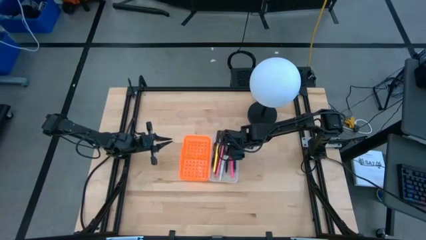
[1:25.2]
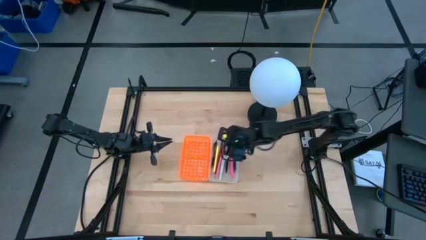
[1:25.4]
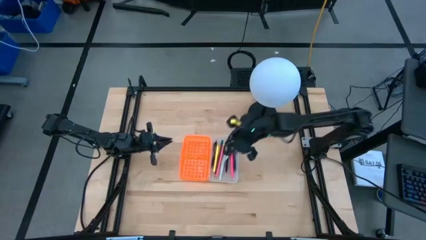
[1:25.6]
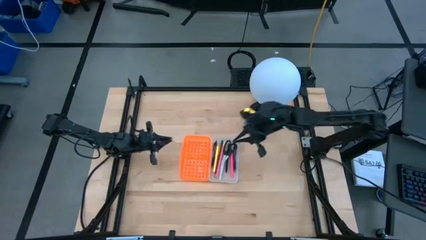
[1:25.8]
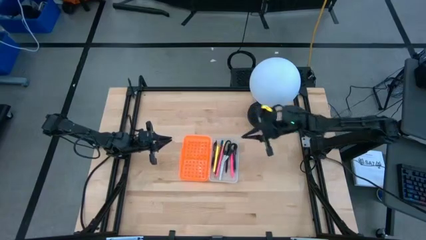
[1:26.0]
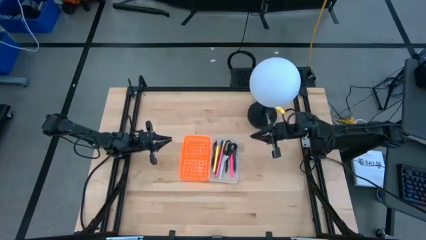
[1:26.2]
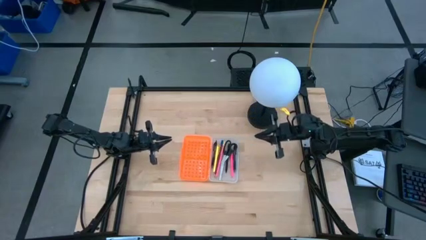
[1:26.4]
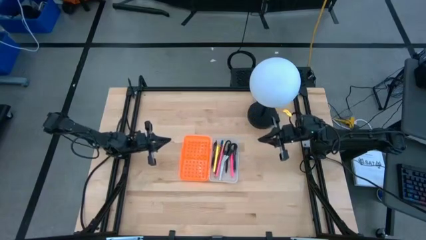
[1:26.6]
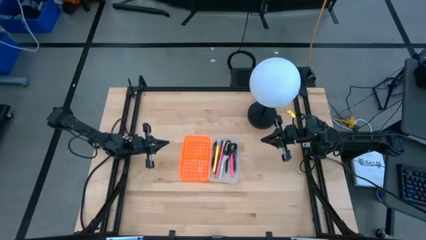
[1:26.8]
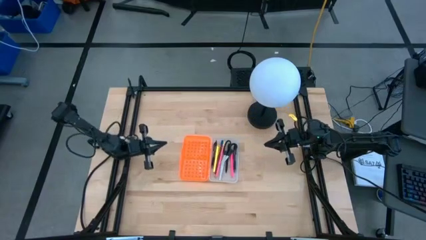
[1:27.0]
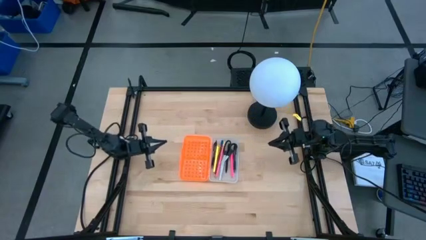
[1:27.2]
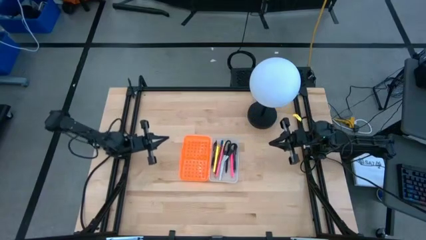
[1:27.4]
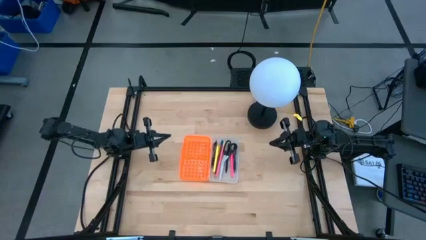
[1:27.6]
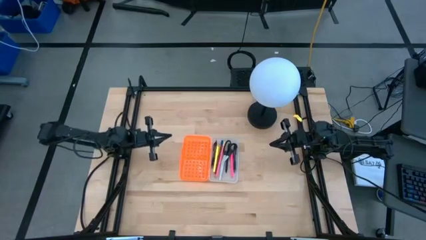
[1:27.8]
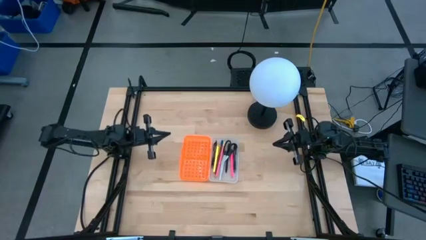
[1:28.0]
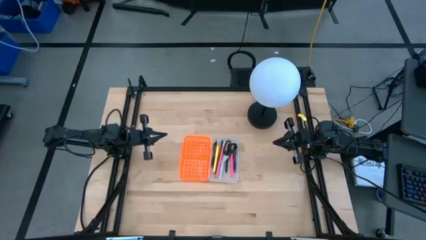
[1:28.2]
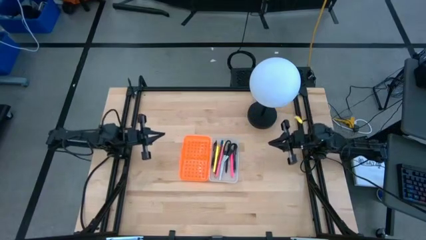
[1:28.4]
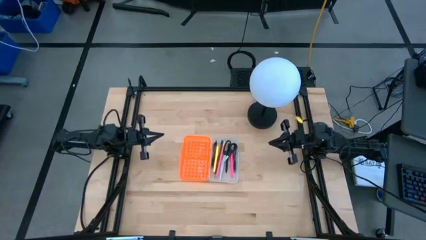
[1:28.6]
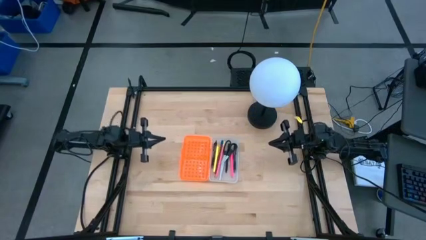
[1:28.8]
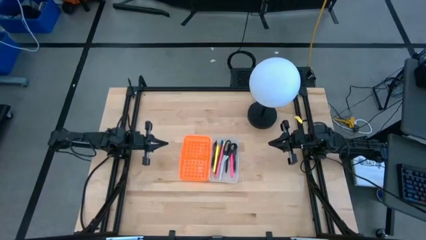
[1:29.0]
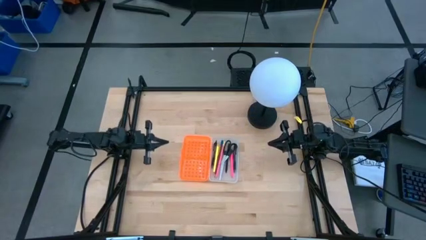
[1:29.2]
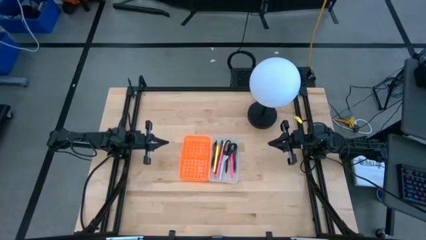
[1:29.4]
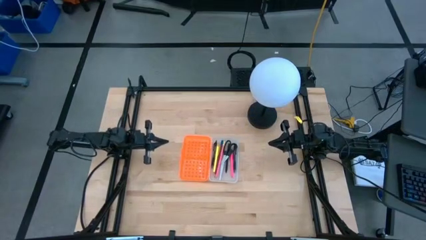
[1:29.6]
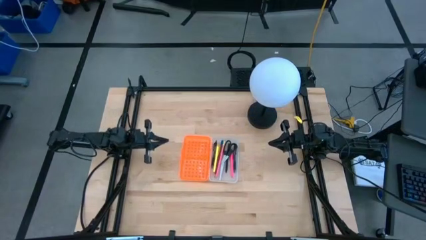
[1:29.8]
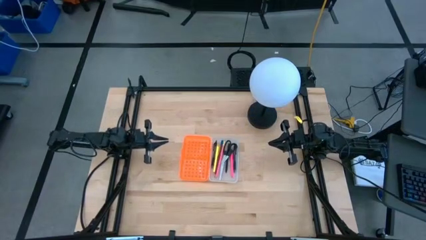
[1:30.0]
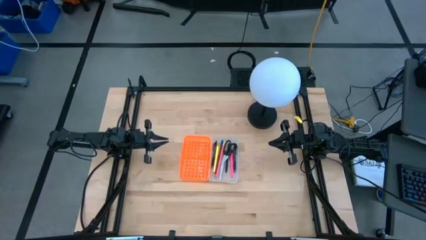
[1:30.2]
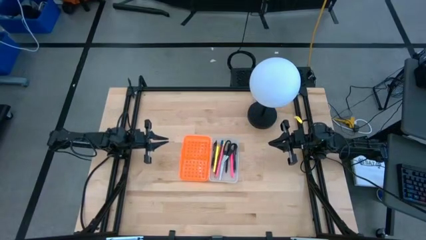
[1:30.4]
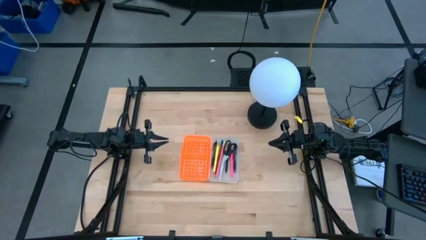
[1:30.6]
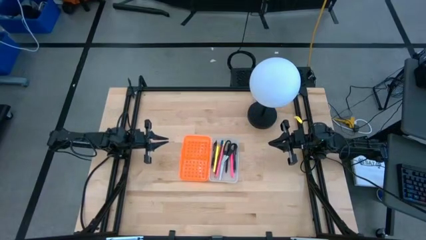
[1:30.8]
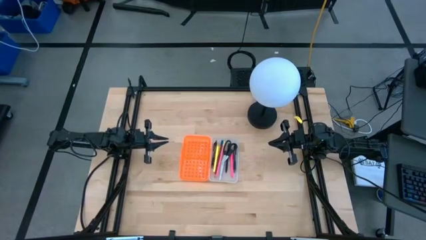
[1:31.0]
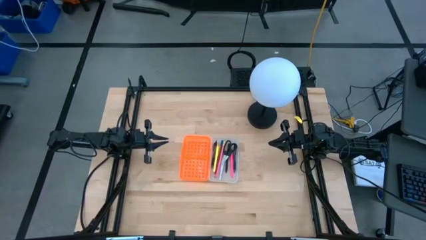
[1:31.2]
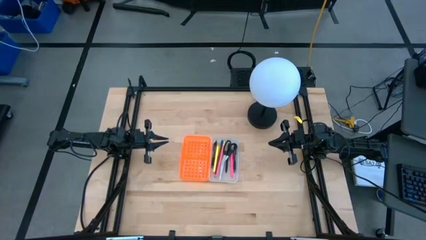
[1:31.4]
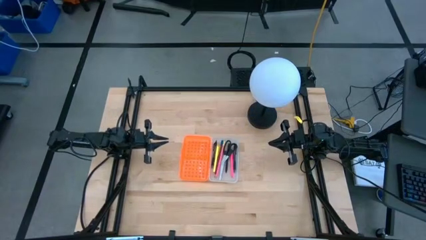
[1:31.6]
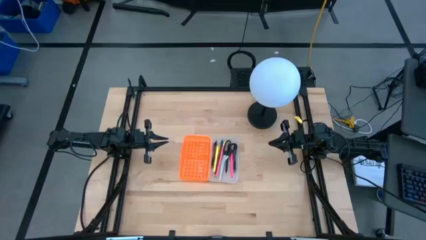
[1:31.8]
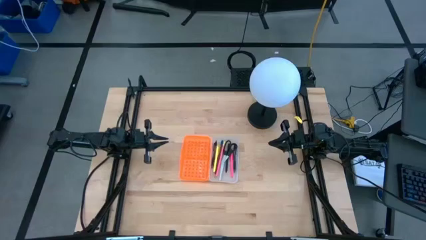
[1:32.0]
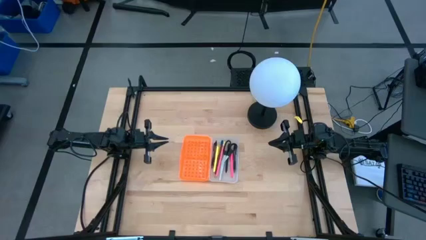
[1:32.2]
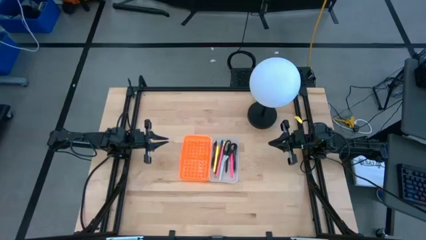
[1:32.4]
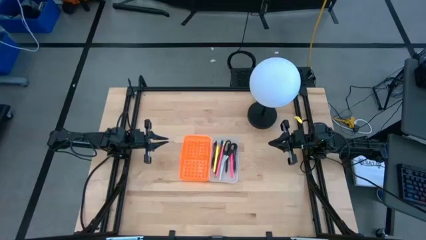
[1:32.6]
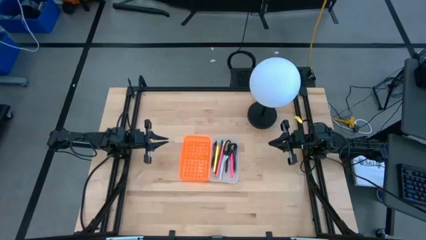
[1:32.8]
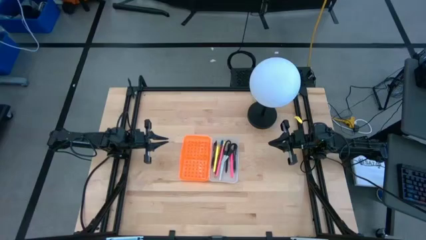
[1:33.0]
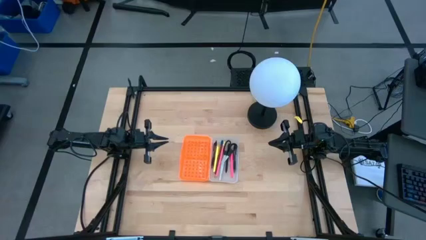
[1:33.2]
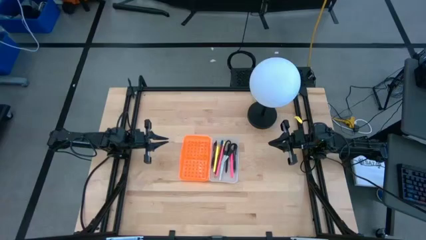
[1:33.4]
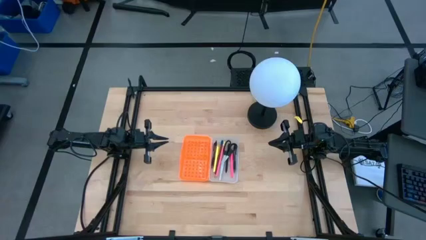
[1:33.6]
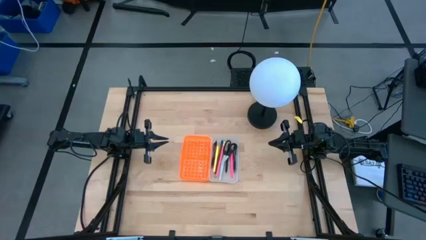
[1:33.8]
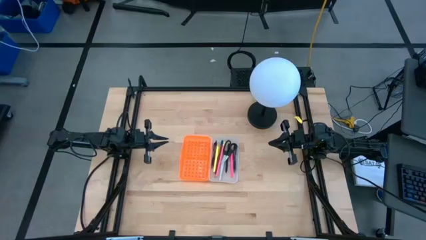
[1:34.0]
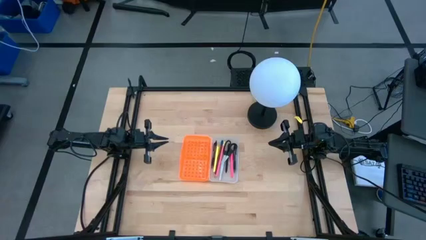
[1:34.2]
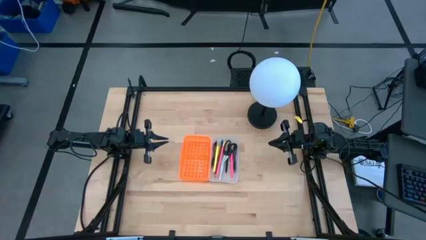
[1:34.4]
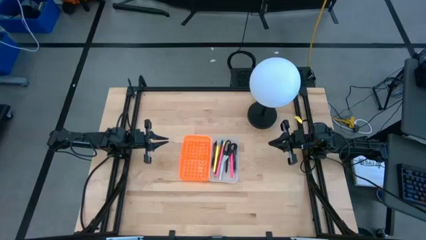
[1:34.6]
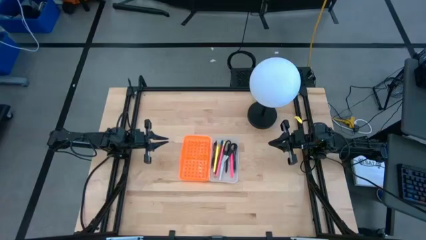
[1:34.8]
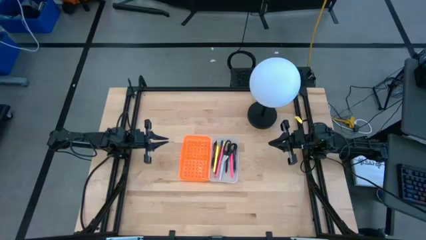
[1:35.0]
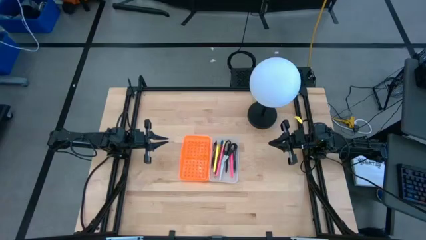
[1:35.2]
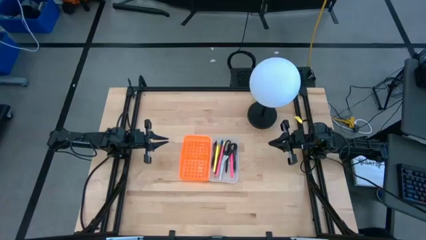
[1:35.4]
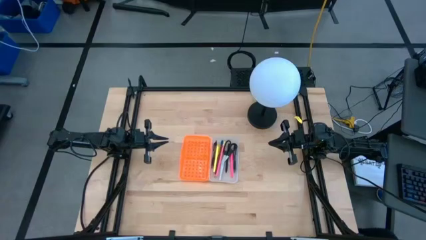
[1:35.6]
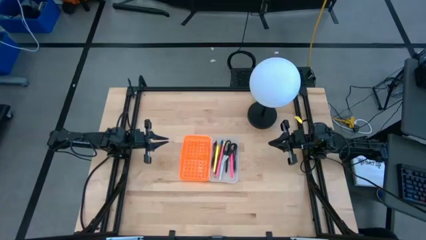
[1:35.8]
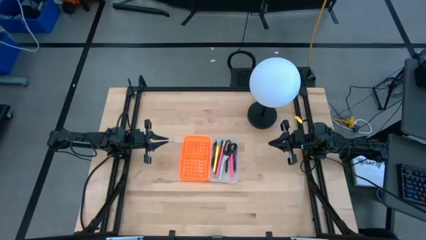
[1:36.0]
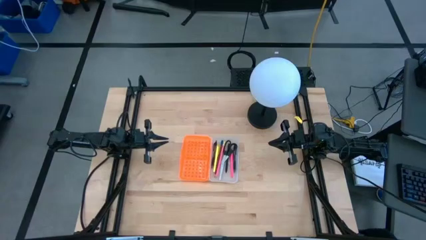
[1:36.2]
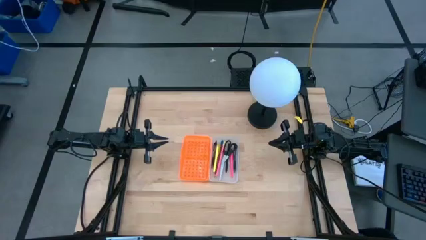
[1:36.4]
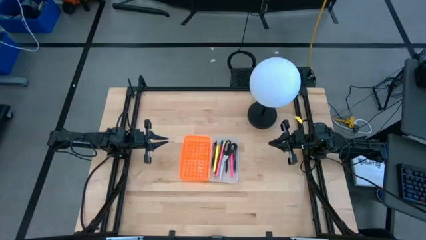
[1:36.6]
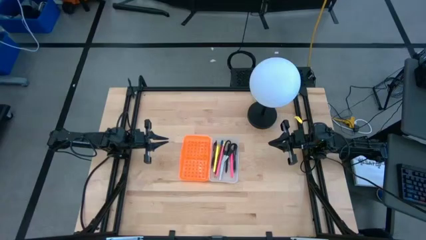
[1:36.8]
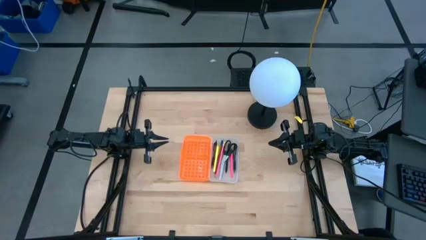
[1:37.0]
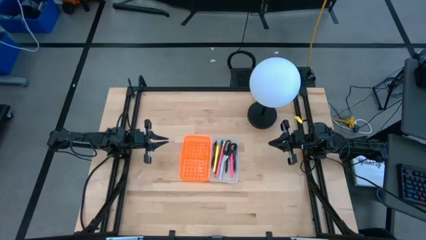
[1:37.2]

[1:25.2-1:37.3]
Task: Pick & place school supplies into a supply box
Return to Home Position
